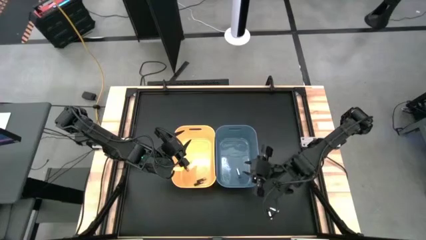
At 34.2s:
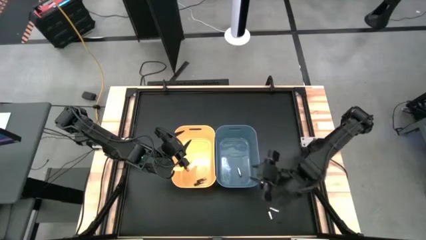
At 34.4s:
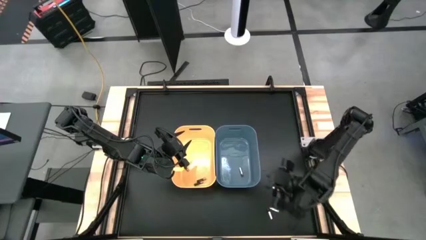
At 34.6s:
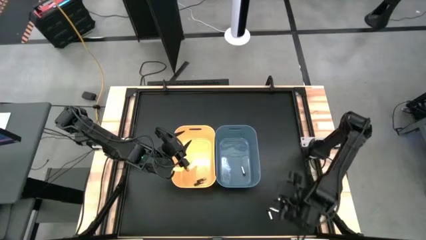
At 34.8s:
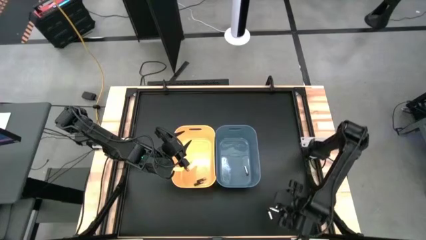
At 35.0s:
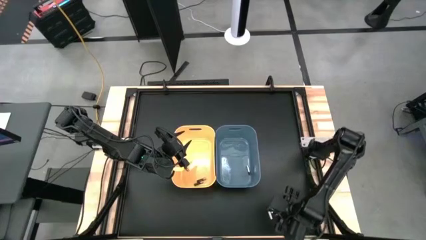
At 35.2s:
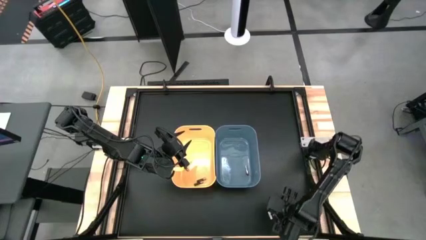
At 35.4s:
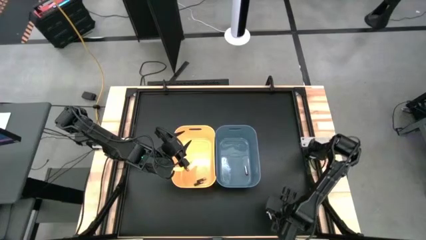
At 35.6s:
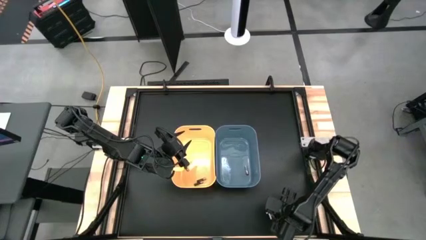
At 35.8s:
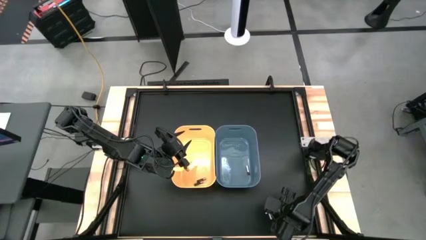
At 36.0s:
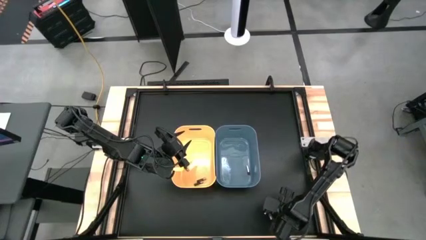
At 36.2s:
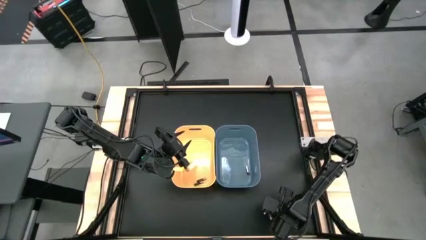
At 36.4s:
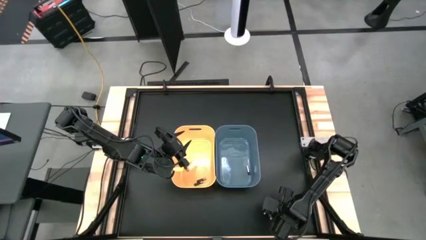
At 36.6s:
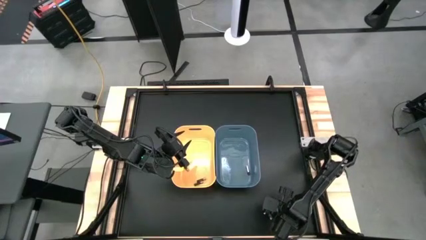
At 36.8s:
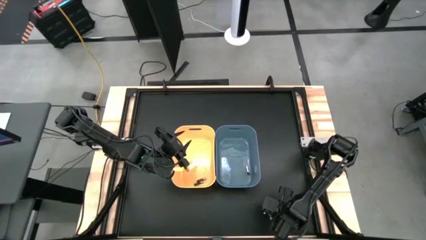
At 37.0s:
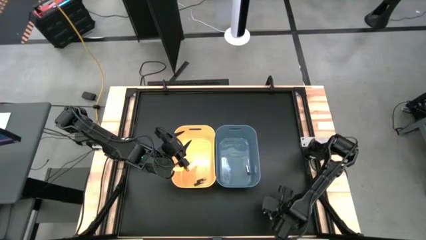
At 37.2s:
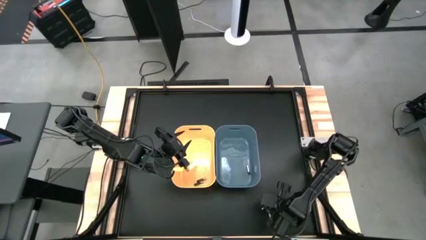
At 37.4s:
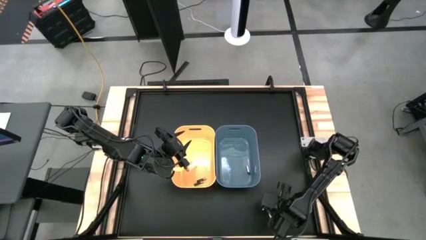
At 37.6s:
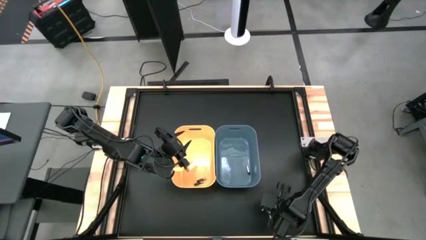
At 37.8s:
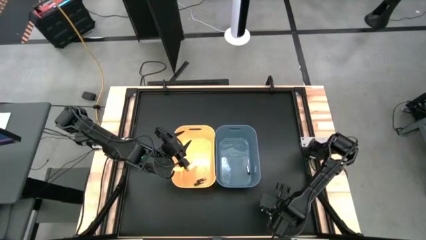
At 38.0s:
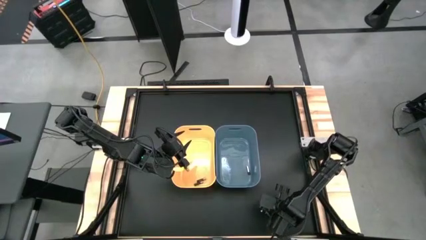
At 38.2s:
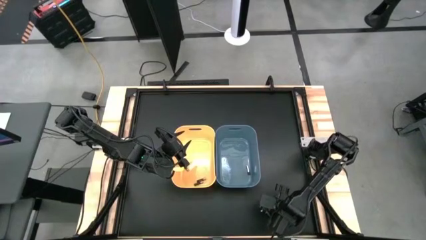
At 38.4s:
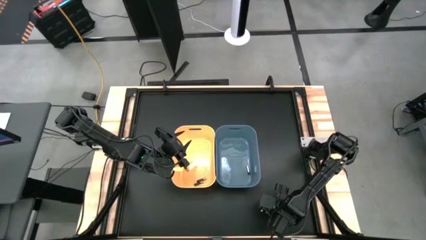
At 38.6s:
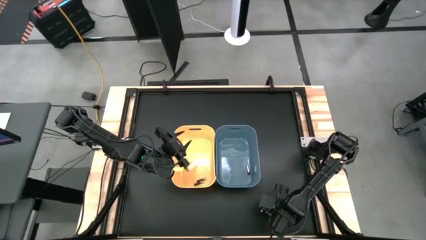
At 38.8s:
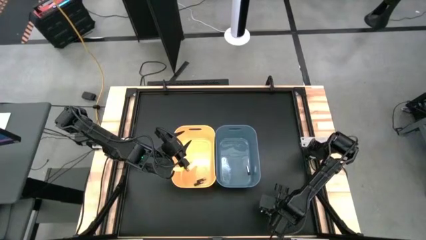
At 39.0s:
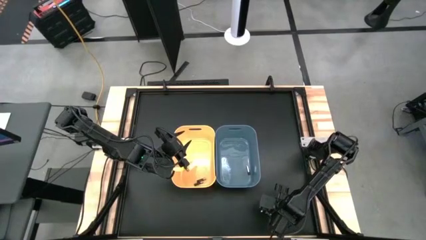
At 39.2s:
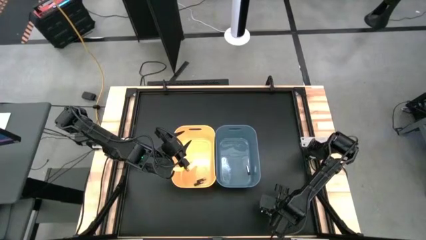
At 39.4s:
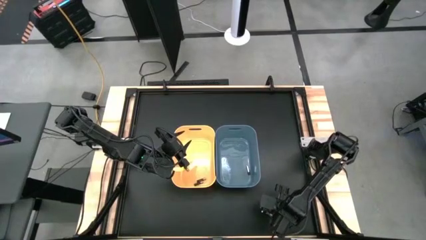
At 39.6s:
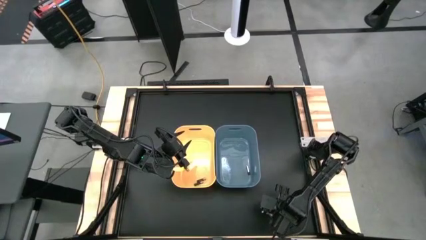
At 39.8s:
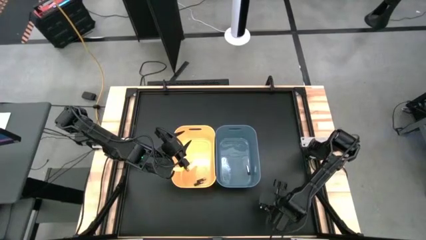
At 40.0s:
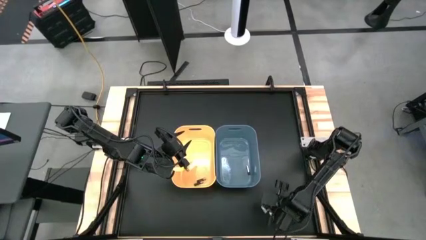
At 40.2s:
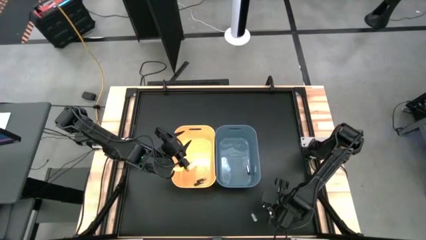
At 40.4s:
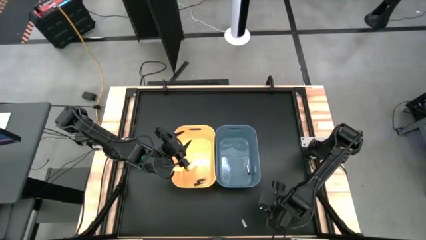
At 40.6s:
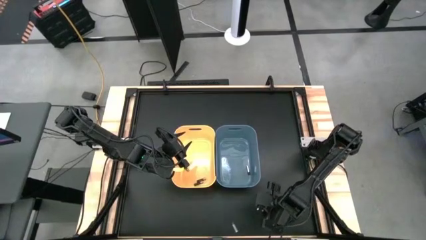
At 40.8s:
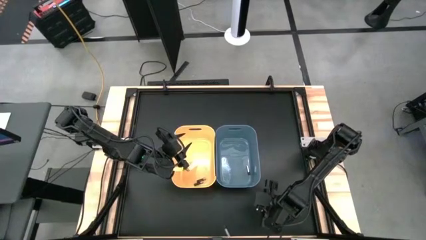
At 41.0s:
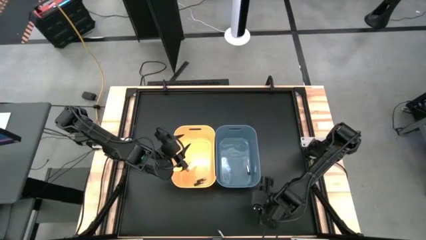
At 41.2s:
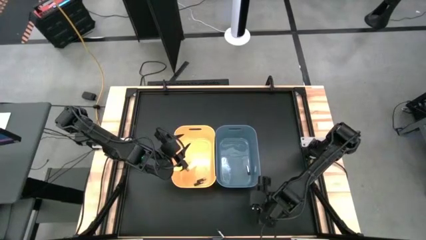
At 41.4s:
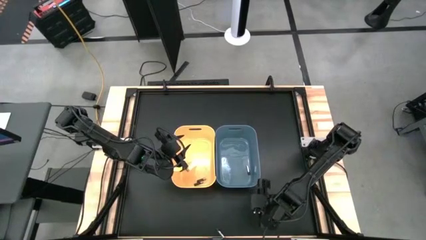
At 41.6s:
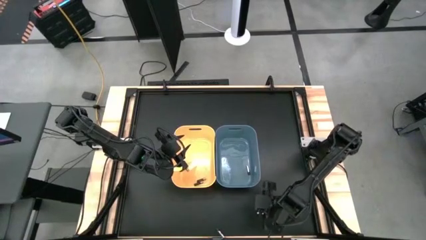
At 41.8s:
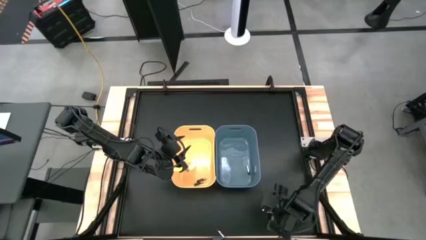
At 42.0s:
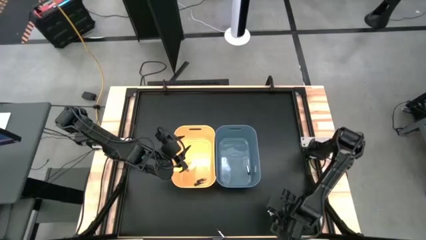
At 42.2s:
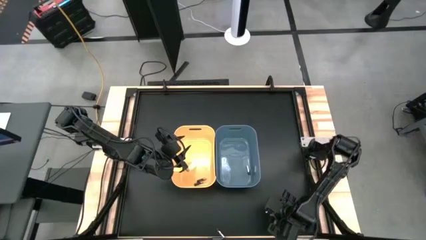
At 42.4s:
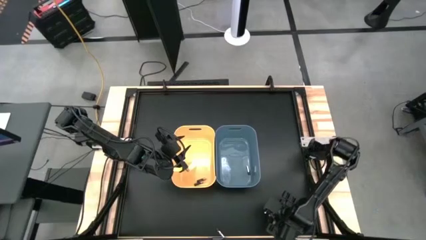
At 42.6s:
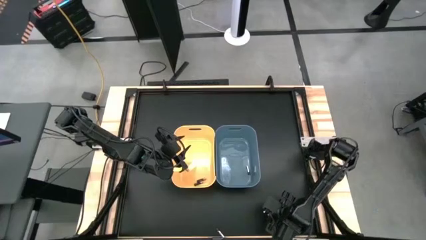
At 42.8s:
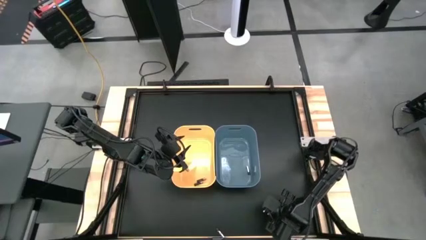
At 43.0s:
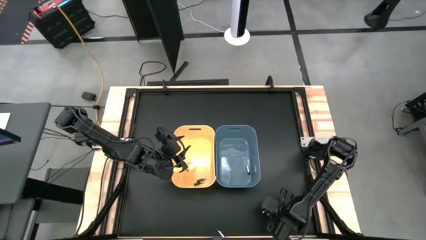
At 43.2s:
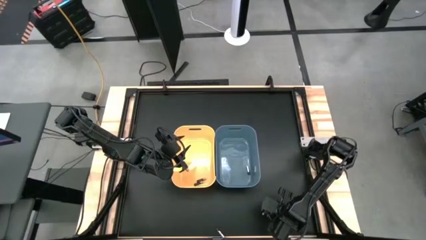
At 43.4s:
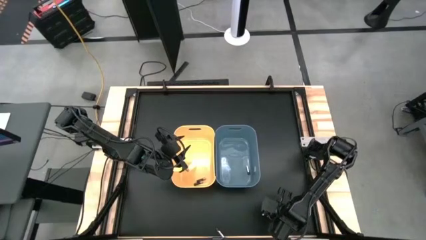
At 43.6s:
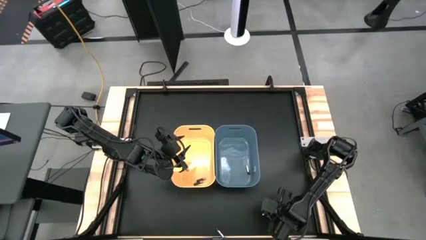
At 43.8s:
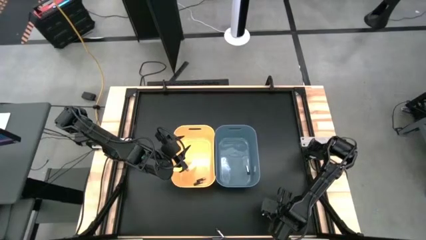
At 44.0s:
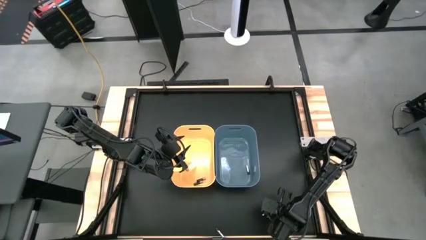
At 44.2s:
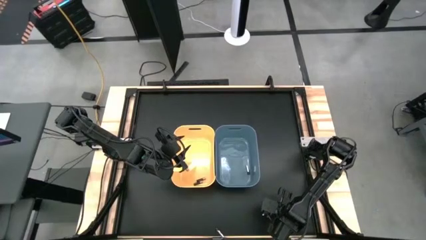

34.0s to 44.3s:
Task: Sort batteries
Put the top silver battery into the blue bin

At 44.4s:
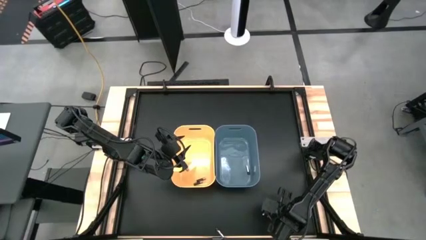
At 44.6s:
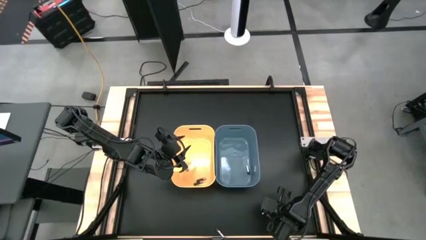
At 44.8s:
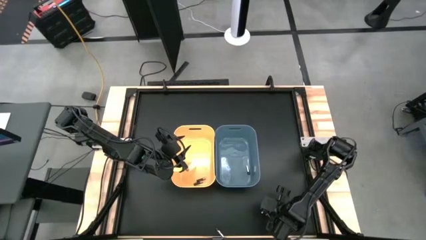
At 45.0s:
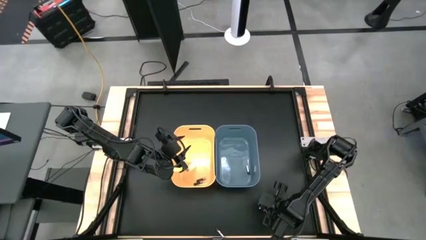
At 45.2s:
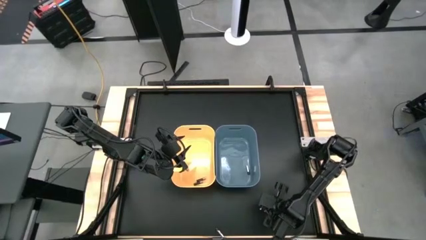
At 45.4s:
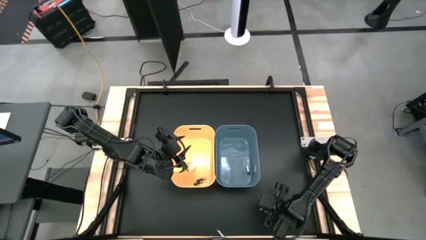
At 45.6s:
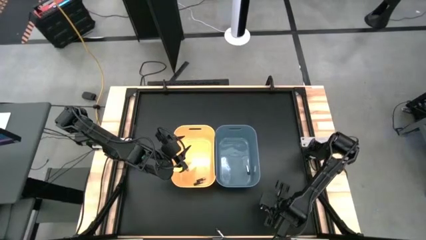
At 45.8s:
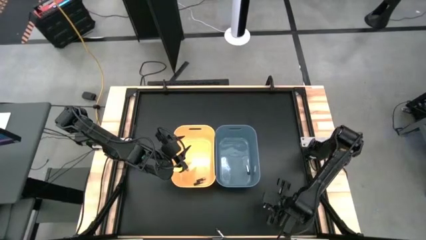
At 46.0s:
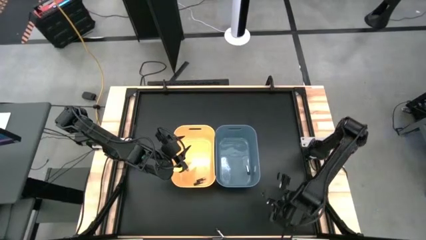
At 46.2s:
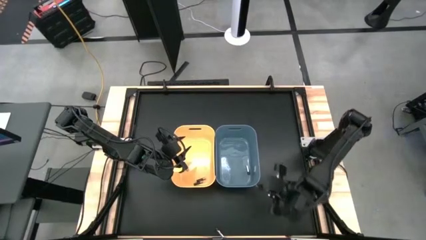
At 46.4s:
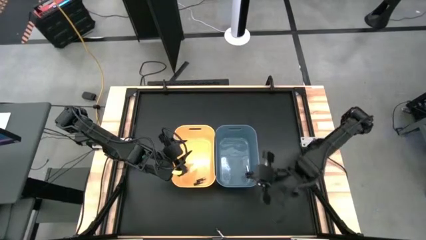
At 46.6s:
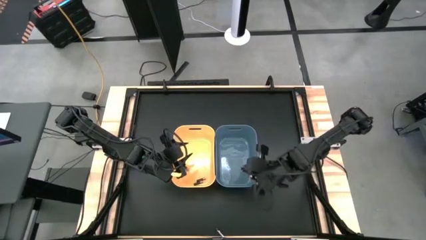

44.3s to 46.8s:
Put the top silver battery into the blue bin

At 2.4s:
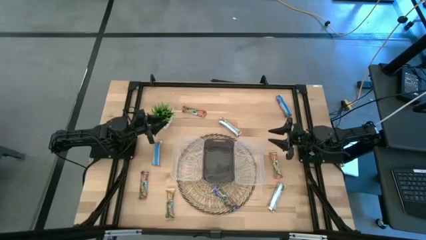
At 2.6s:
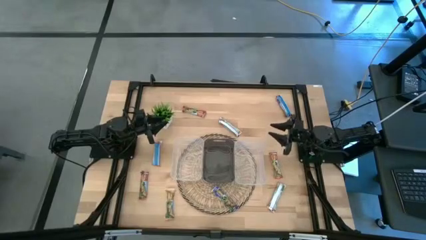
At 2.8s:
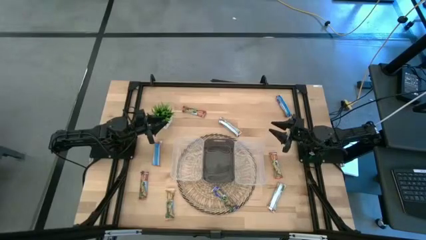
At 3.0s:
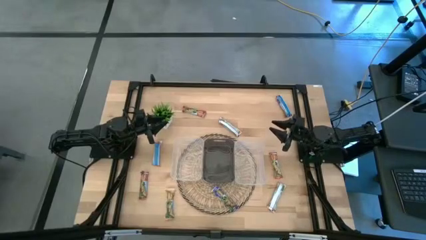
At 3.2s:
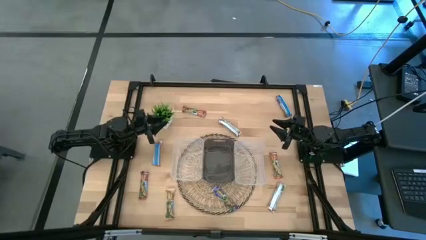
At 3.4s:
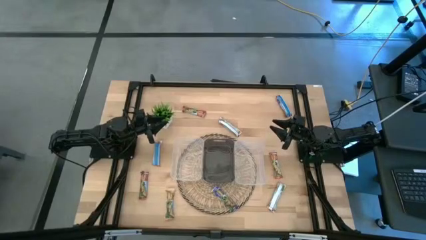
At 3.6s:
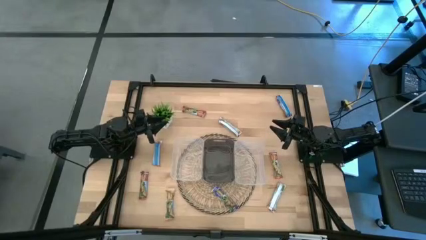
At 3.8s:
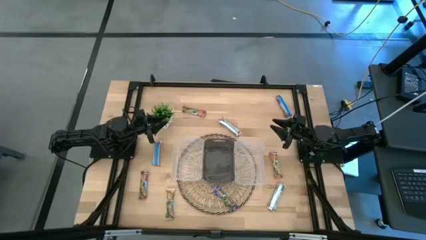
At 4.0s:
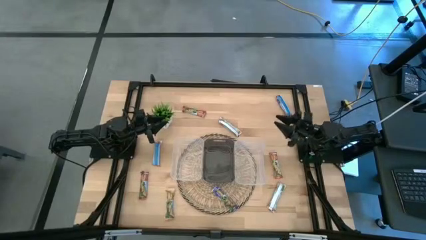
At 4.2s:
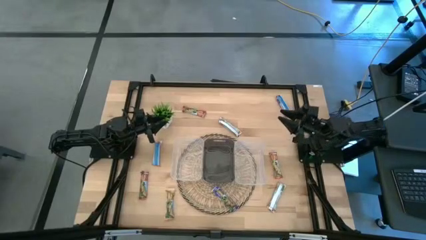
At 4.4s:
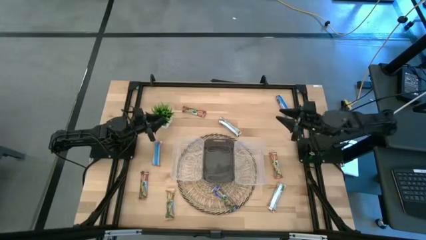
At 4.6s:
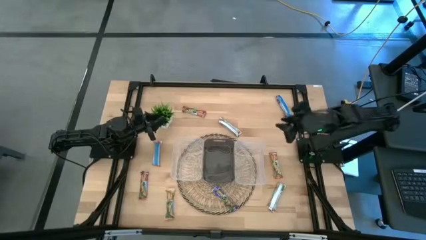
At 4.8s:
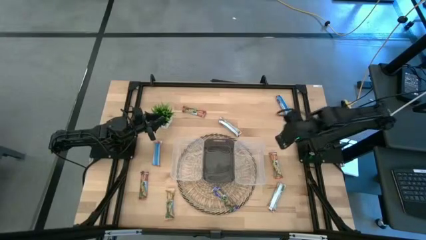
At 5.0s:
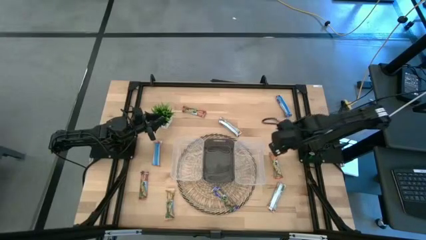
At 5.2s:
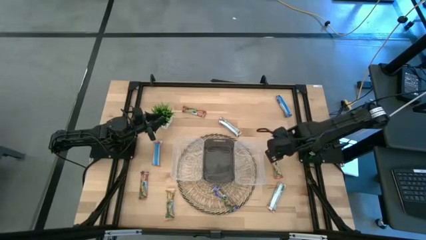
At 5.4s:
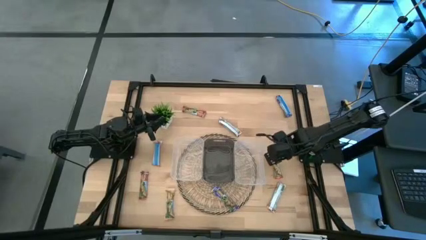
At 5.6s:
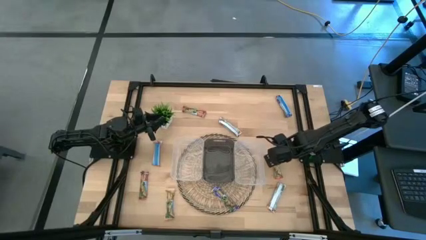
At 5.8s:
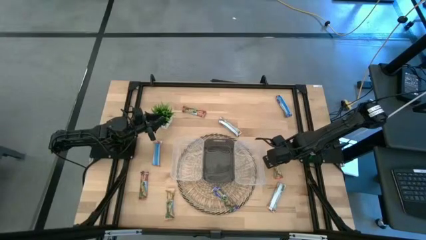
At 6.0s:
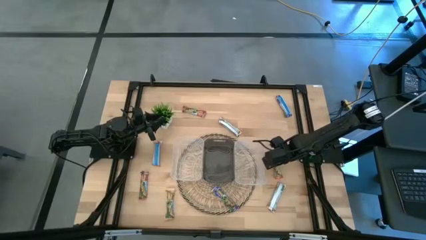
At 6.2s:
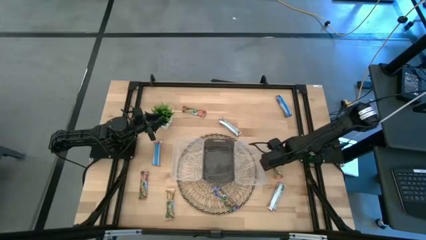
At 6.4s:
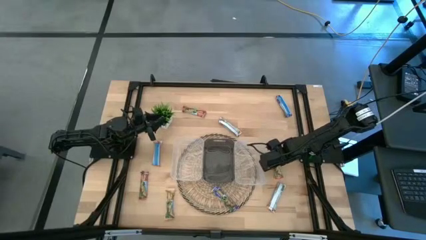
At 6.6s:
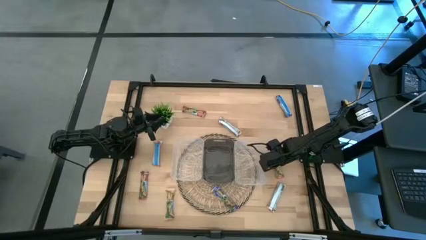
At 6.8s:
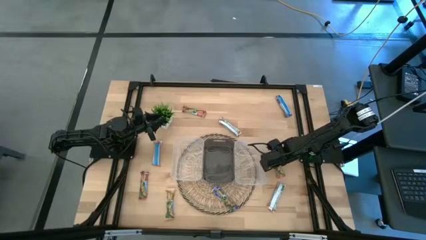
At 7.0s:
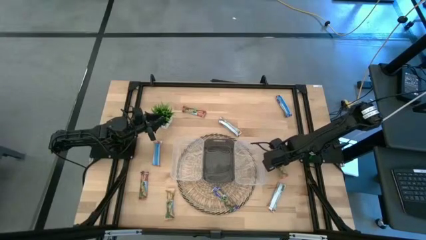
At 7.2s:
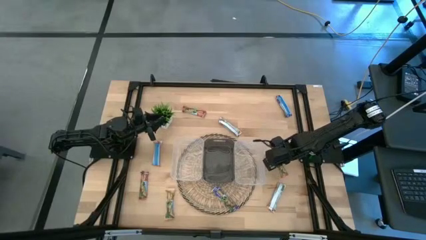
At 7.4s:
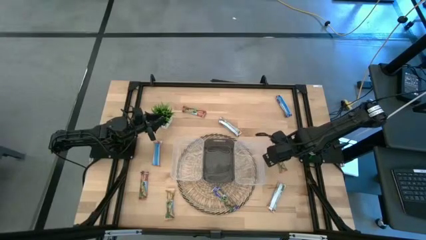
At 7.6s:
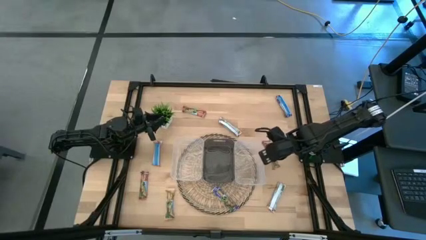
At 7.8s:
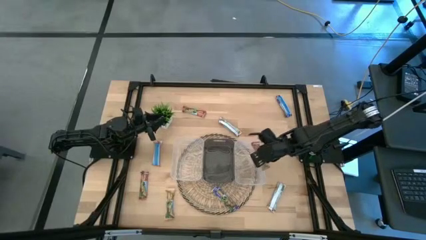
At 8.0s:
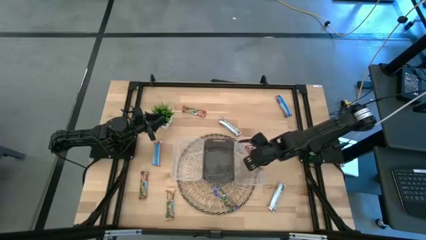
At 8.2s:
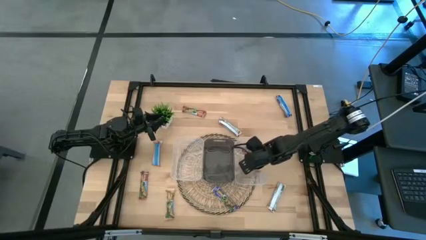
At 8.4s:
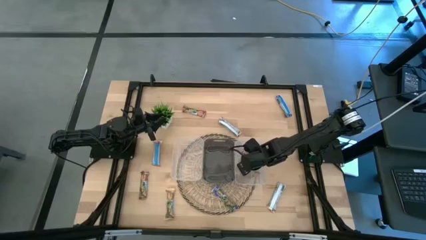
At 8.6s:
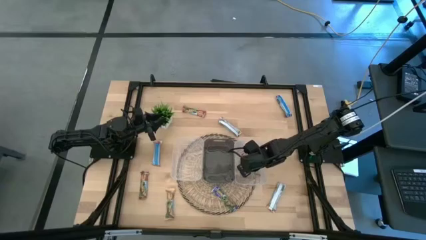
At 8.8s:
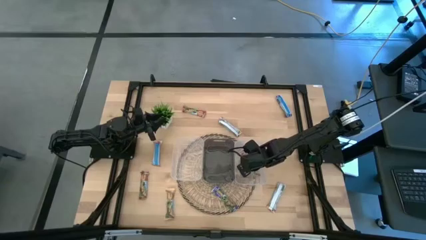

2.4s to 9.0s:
Task: Pick and place Granola Bars by type
Put the red granola bar into the right transparent bin
